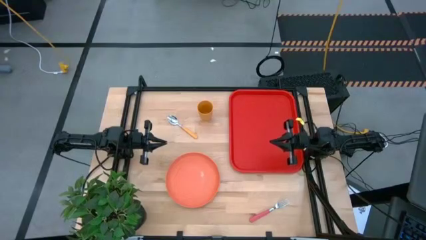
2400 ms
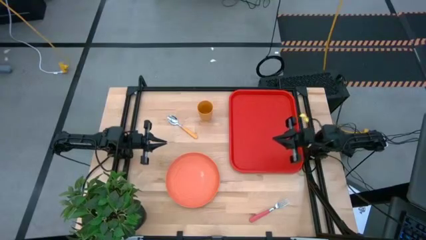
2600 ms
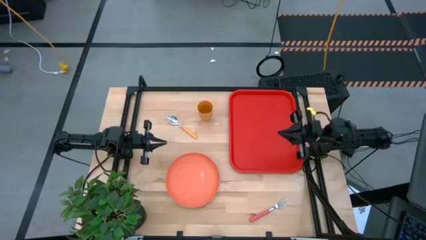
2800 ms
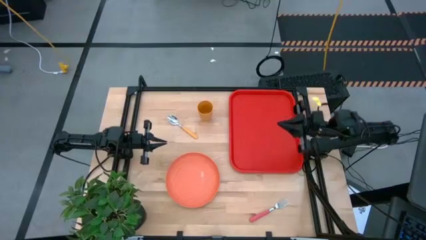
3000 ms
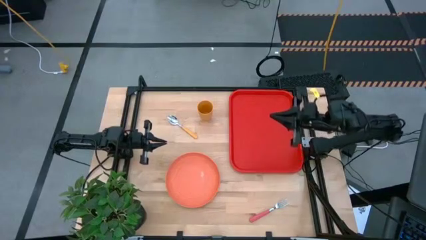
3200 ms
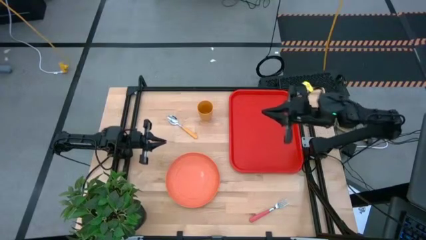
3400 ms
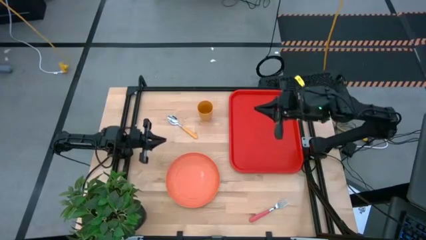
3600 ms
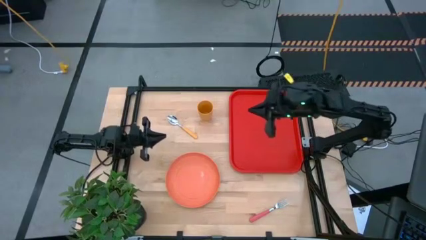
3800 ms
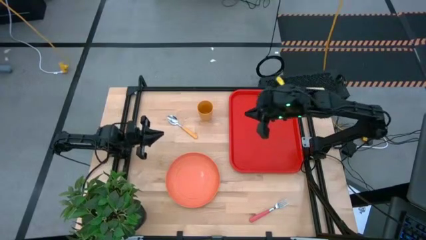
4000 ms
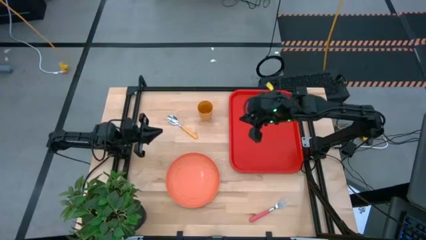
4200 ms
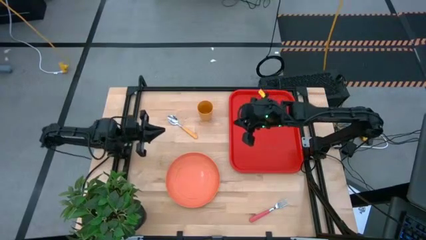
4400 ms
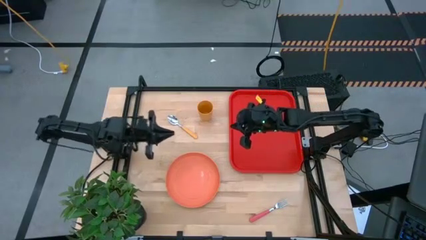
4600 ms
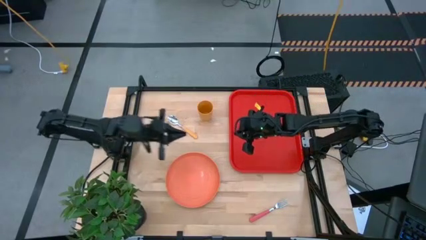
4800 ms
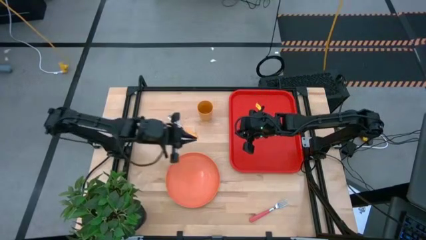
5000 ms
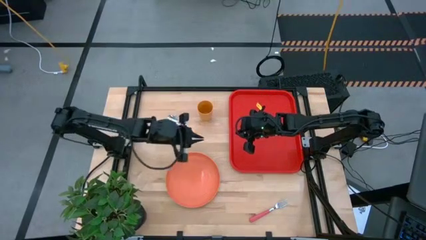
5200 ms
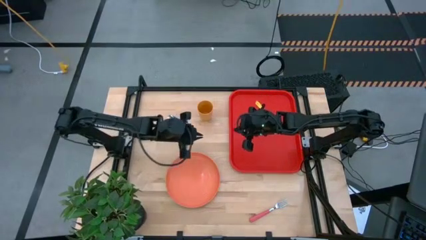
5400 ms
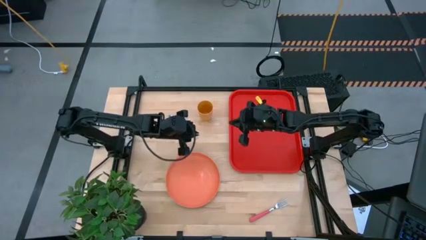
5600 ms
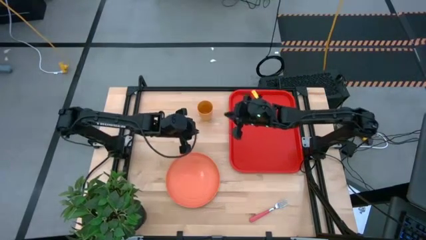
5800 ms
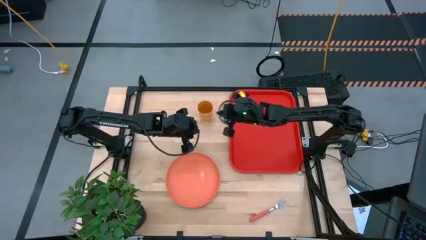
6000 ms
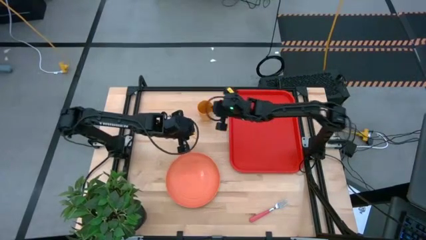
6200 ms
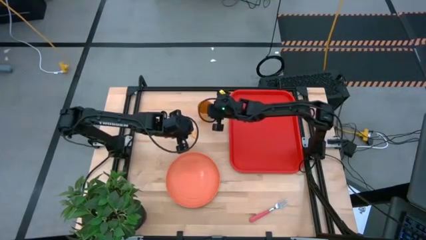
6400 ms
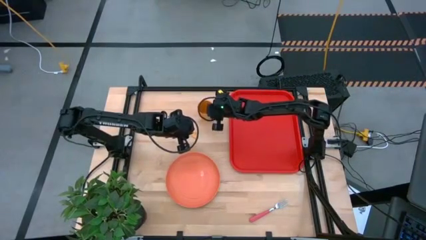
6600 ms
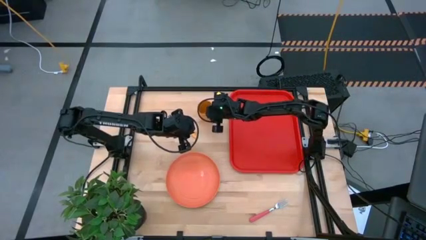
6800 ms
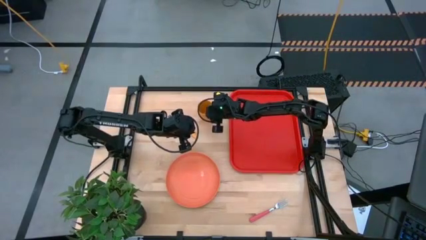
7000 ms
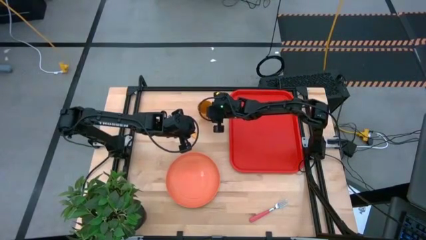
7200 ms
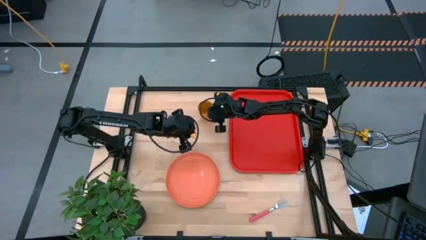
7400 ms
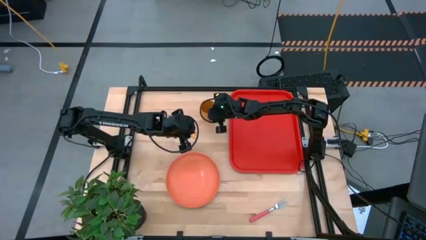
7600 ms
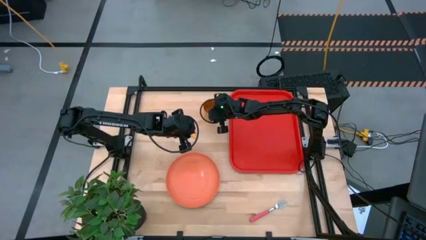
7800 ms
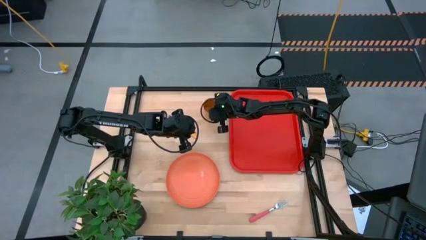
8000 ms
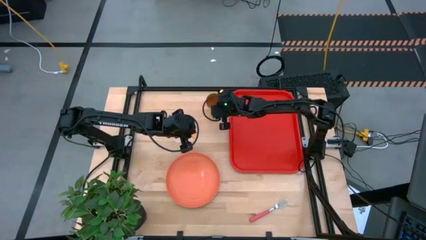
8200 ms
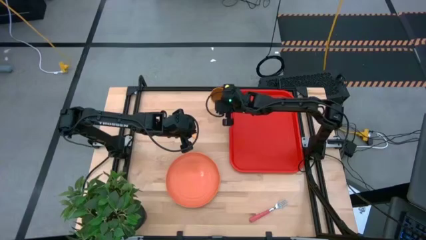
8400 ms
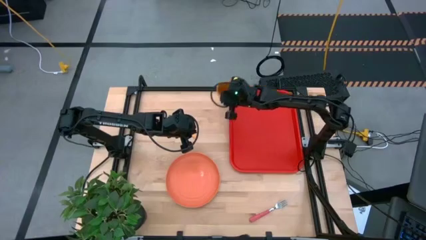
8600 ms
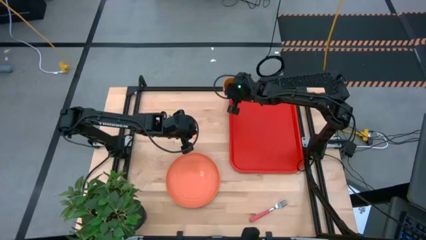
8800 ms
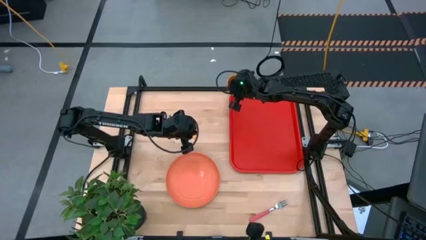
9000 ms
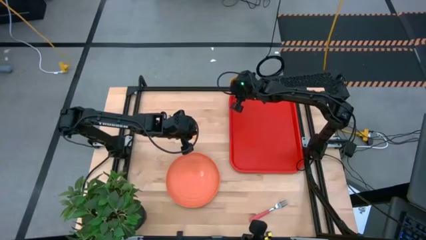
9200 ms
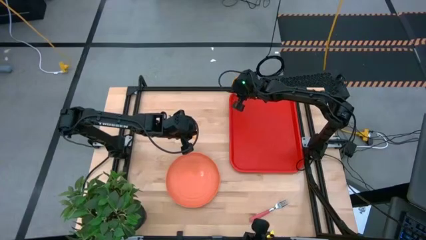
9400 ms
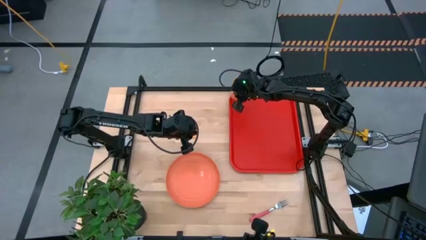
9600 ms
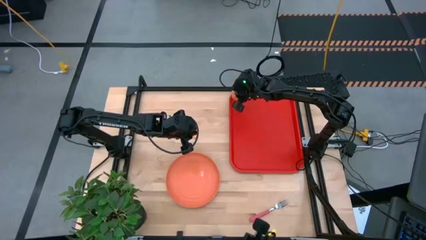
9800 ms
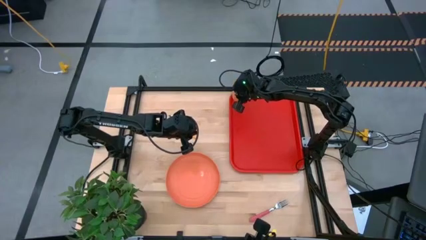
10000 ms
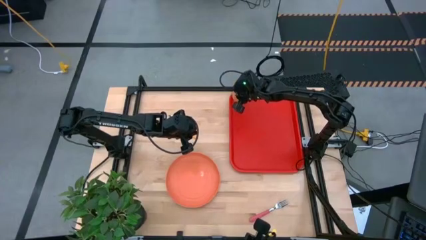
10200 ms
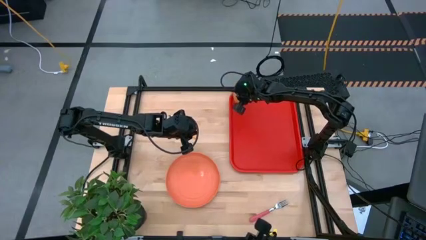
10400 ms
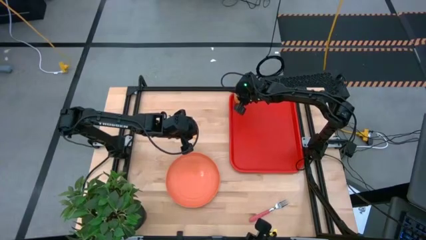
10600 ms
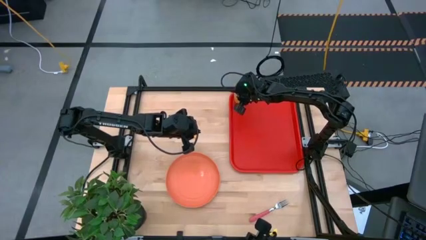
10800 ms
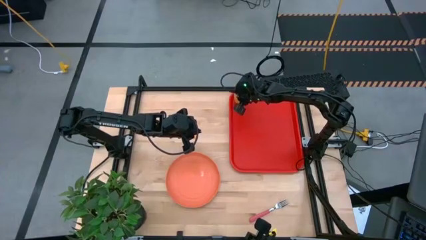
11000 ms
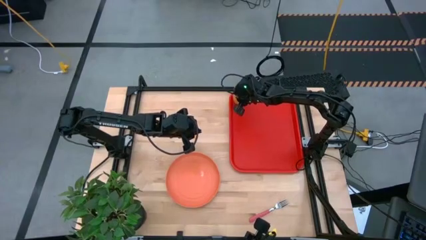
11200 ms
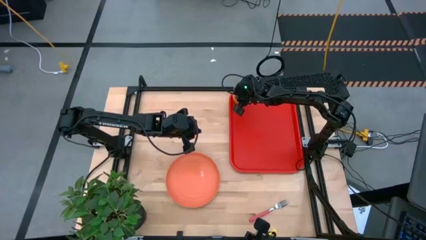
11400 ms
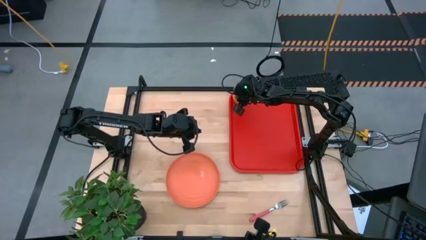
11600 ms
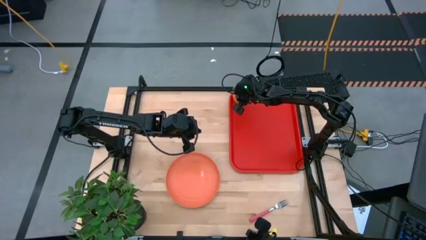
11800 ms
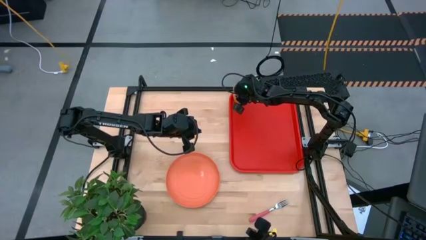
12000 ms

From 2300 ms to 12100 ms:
Task: Pick and place plate/cup/fork/spoon on tray
Put the yellow cup on red table tray

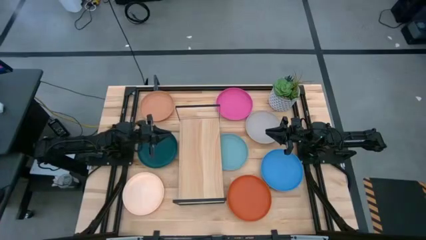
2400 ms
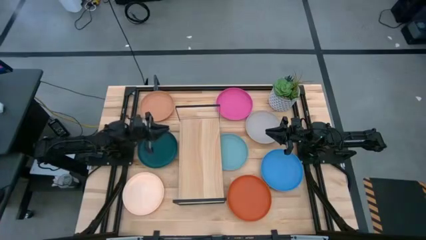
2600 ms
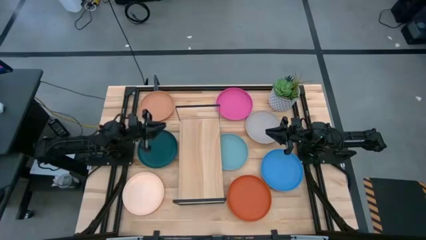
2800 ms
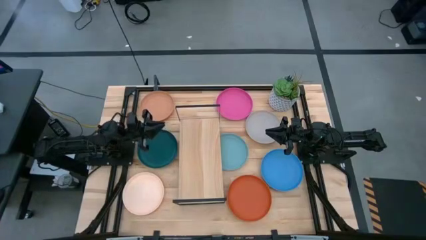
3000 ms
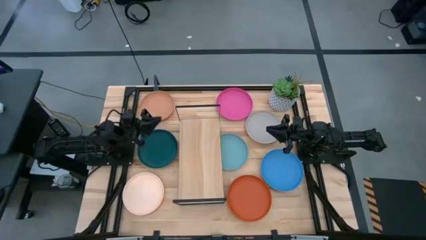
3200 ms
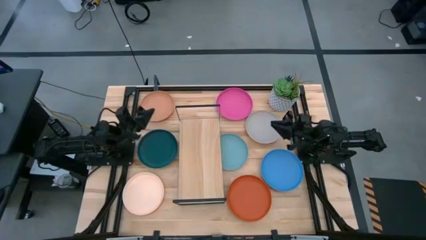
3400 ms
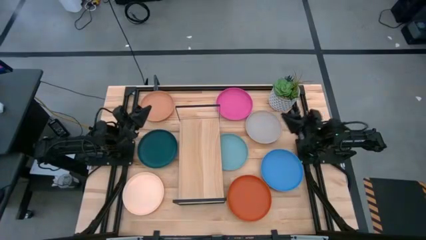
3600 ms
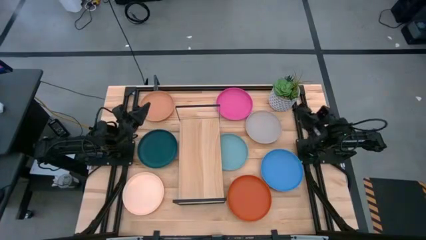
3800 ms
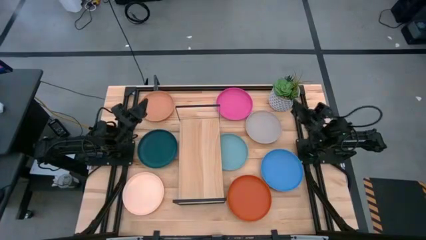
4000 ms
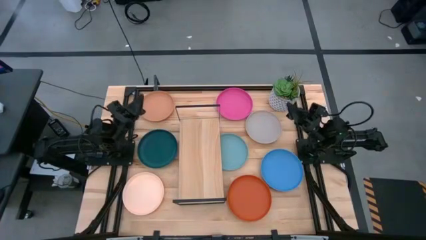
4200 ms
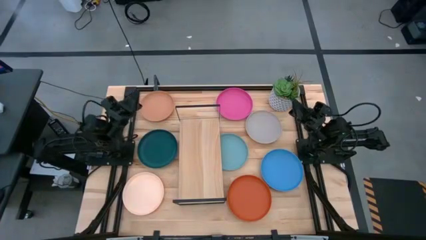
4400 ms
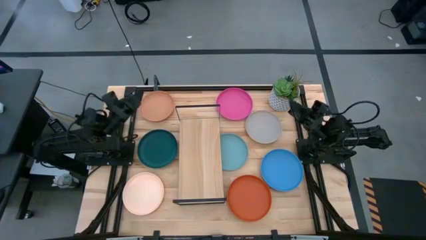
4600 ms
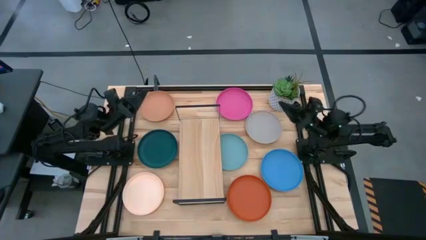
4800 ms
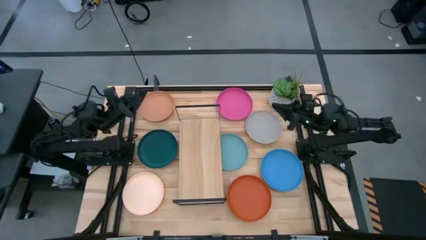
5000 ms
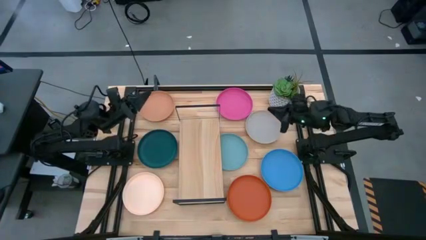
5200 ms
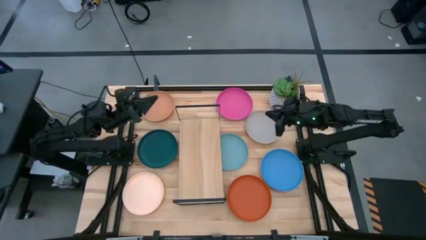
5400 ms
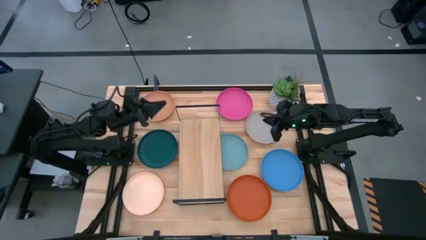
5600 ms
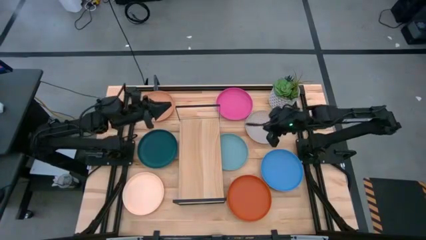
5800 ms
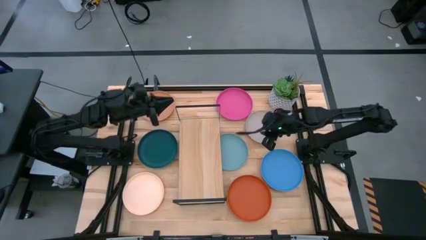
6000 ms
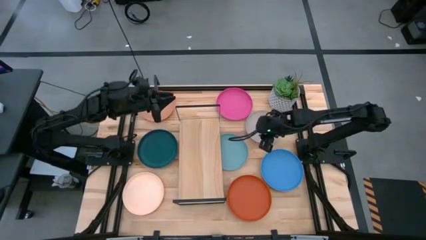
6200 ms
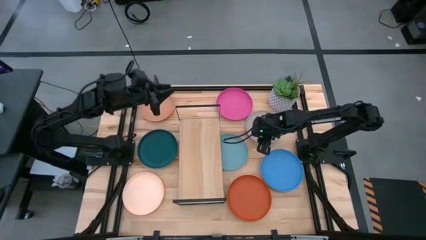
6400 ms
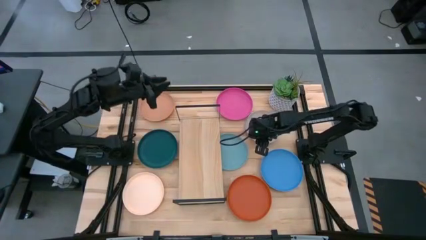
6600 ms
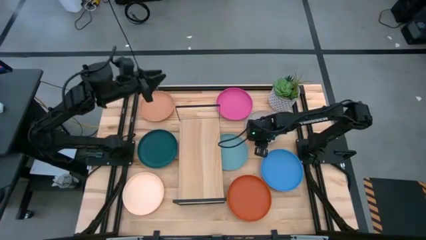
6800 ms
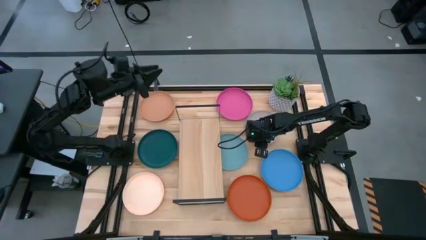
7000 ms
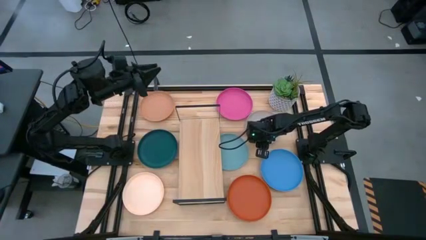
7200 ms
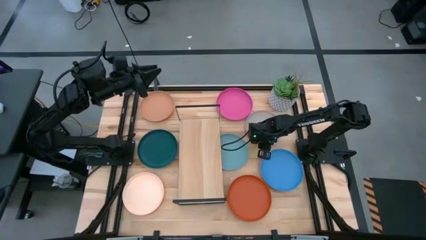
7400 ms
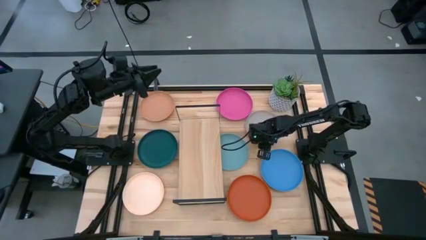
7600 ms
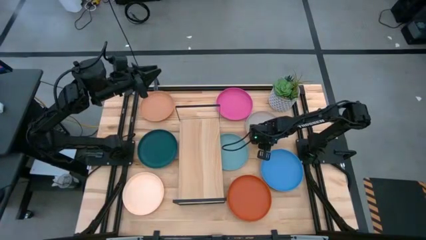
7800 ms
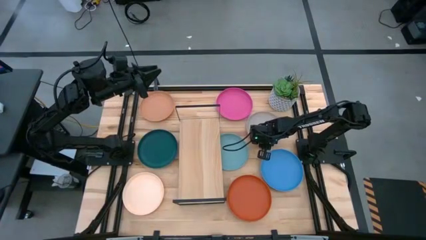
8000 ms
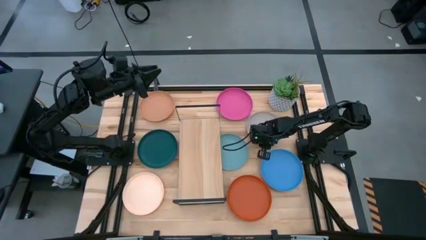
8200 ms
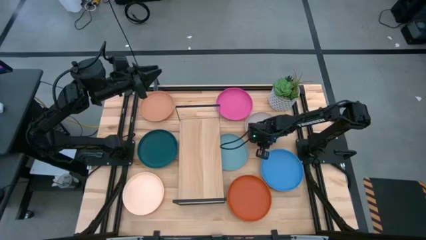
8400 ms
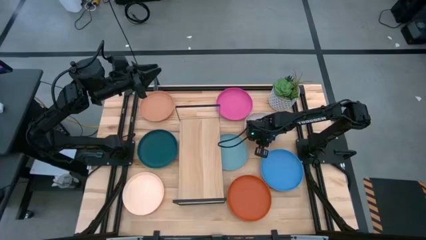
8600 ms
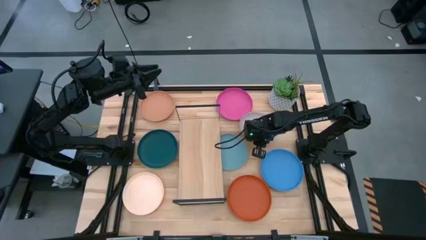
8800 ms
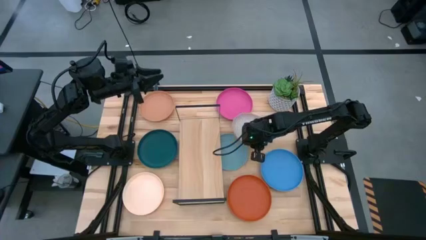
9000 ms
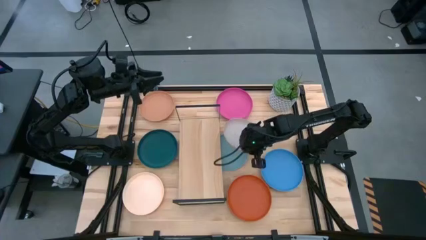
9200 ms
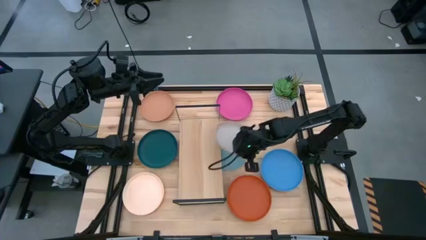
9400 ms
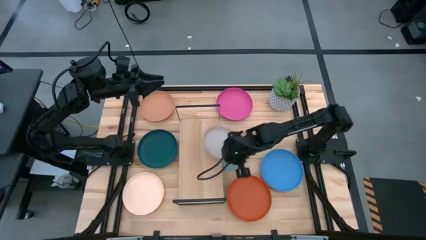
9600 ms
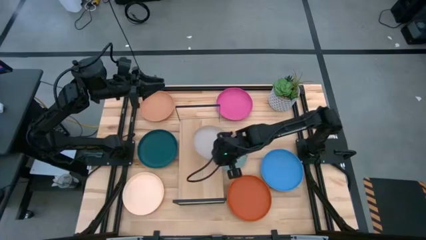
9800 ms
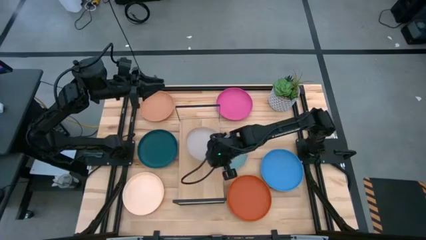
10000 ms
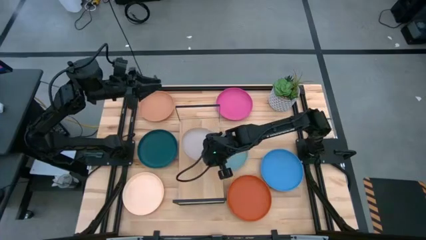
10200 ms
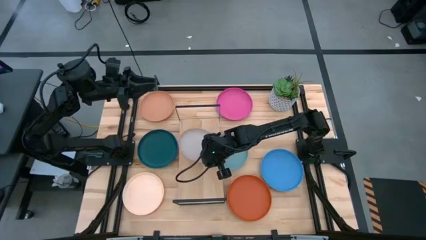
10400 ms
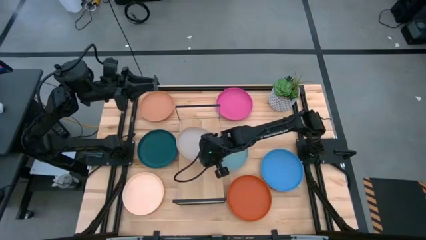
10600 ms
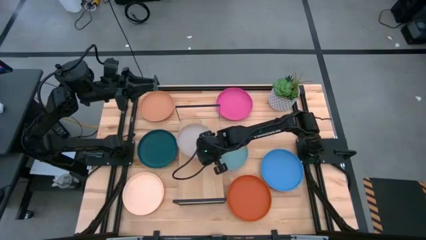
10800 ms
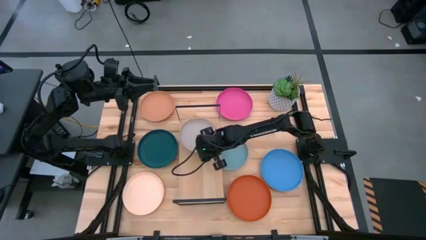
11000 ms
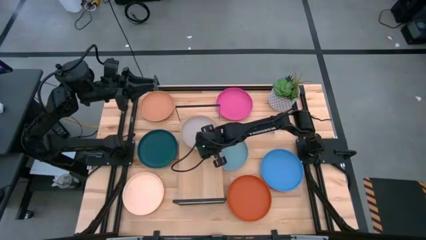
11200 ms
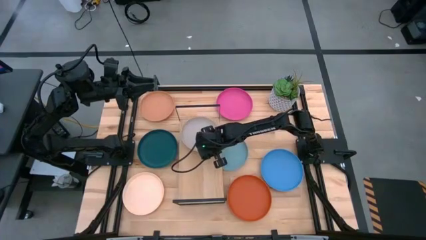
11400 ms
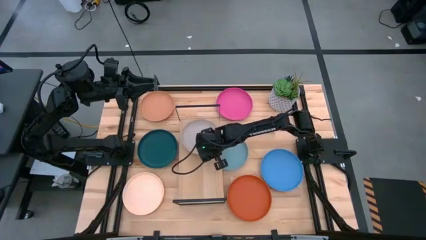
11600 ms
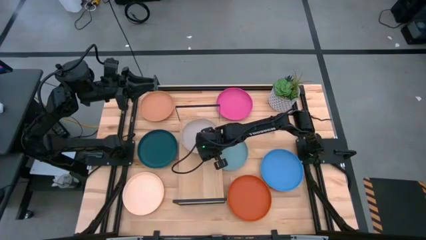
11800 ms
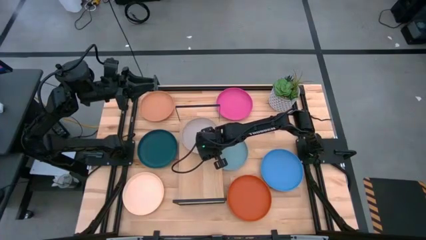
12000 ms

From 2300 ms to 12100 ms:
Task: Place and stack plates onto a shelf
Put the gray plate on the shelf
